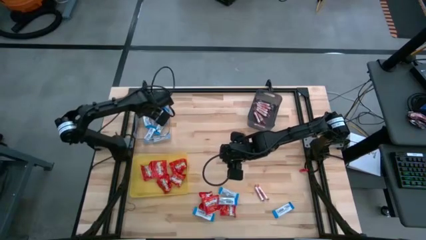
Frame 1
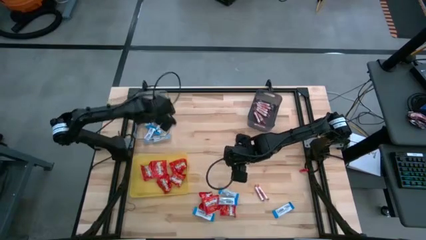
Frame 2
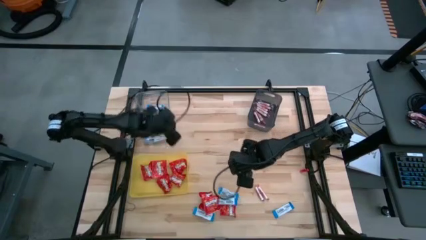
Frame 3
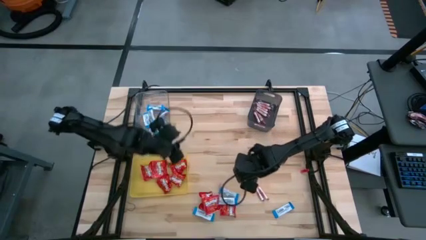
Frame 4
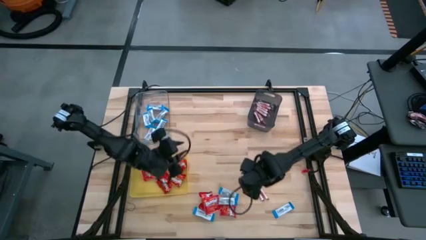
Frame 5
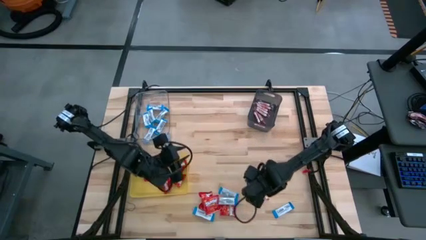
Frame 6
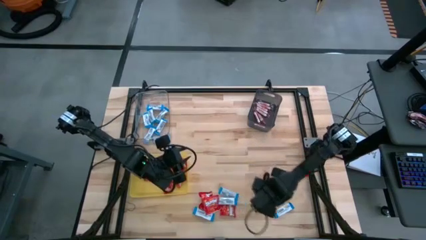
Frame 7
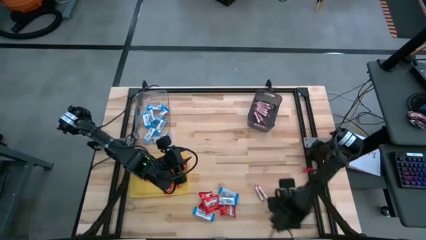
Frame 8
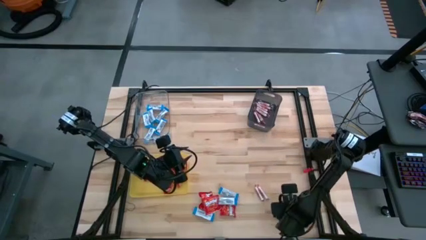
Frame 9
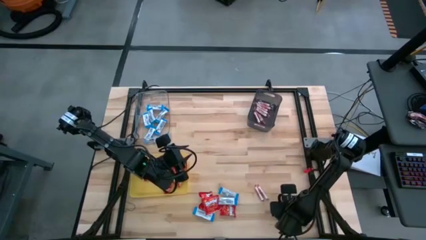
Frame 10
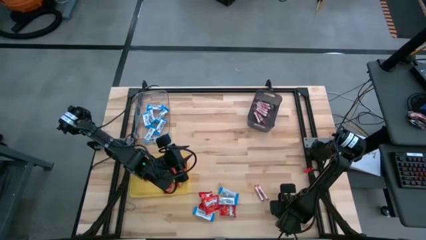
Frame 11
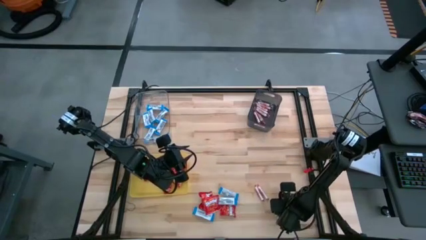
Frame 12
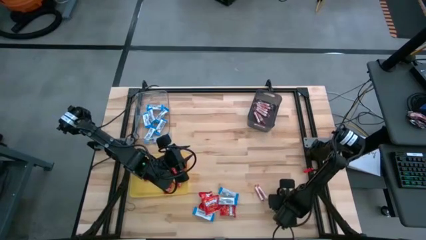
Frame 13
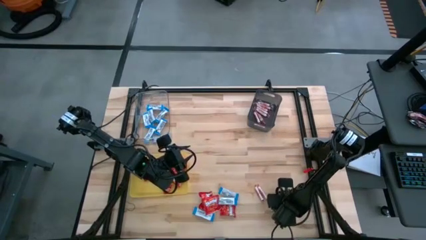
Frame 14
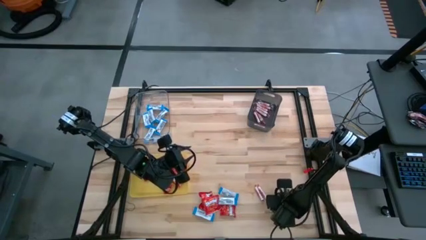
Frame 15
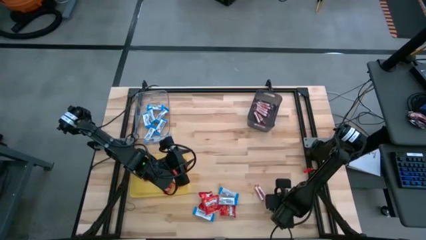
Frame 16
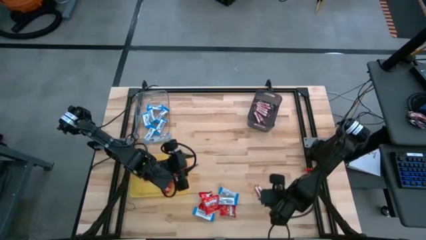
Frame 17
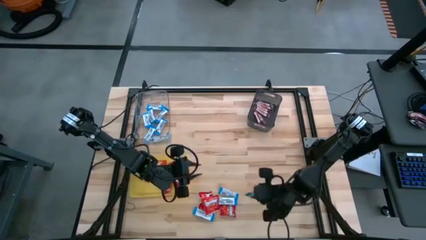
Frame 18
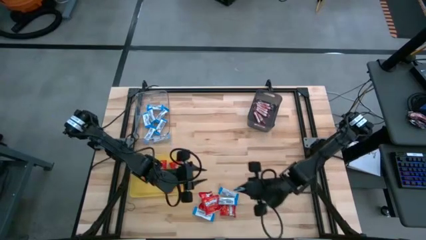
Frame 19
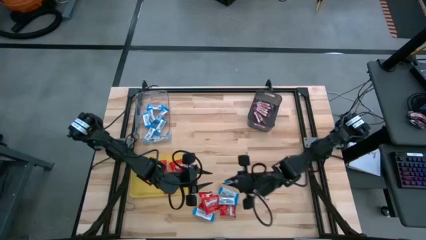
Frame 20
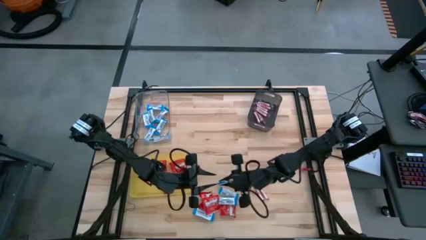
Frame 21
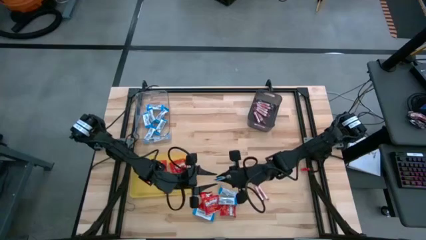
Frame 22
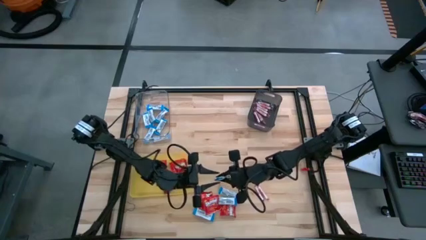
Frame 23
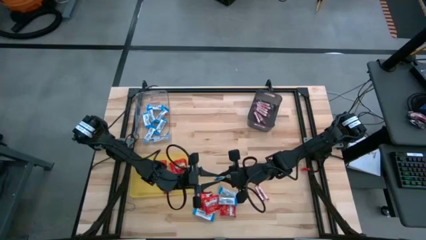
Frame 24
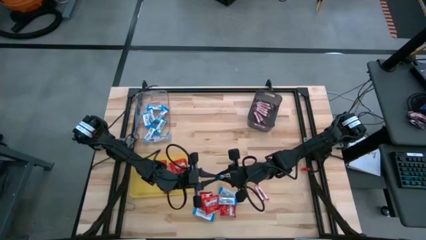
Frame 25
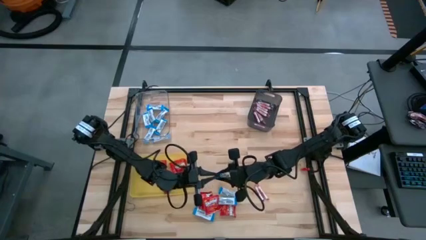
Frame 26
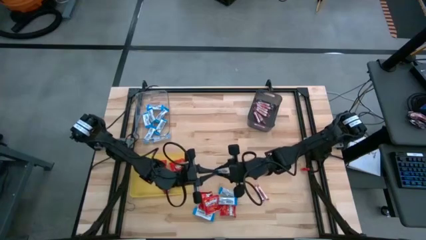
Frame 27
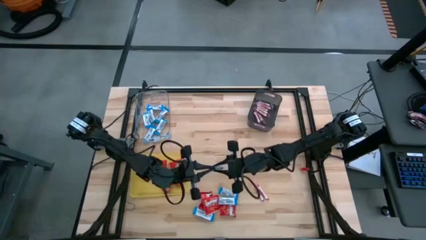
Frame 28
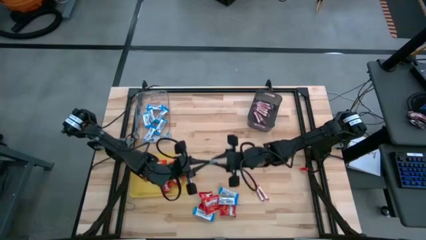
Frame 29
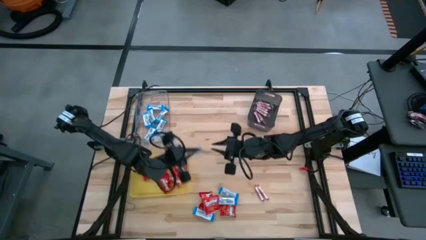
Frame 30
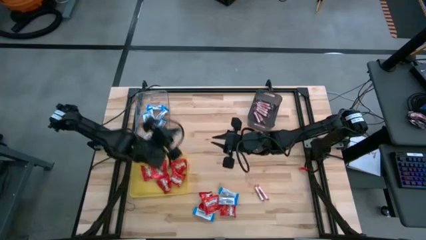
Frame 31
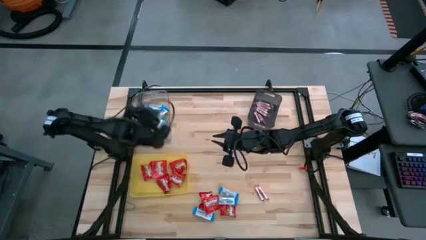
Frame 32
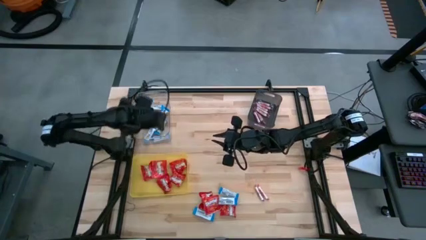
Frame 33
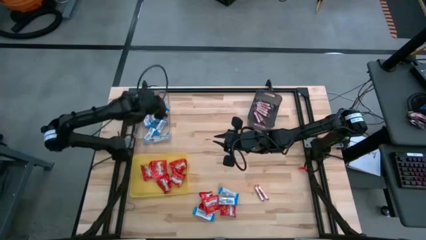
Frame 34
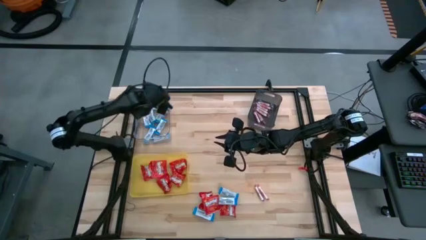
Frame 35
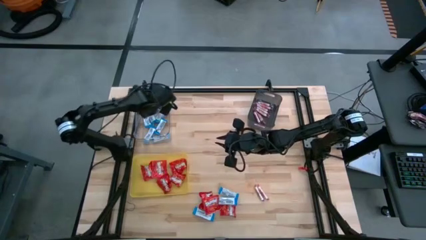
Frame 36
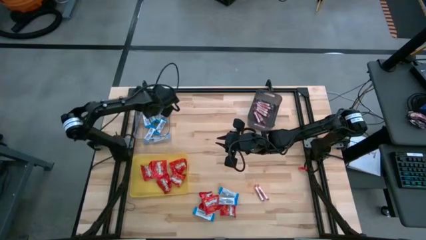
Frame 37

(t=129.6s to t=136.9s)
Task: Sort candy
Put the blue chocolate into the transparent bin

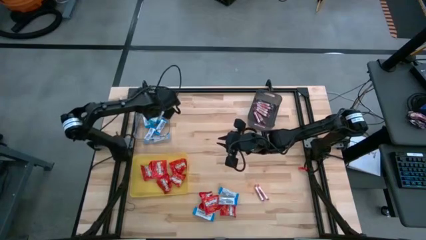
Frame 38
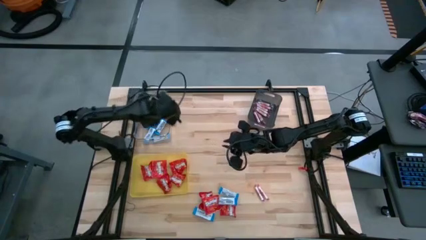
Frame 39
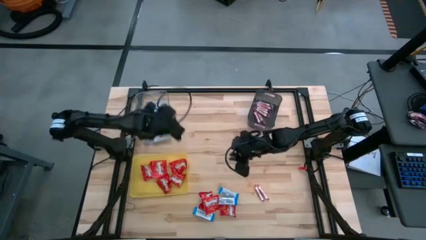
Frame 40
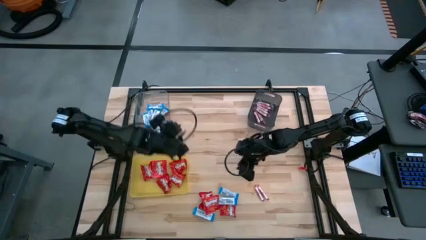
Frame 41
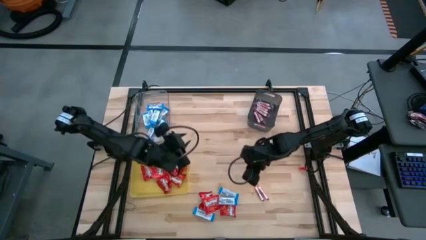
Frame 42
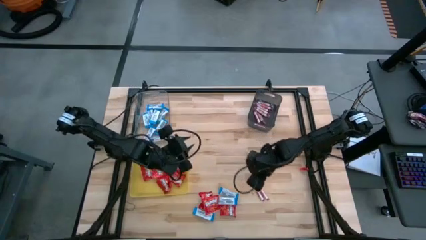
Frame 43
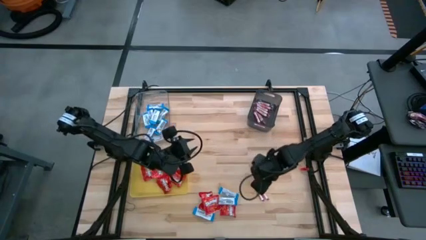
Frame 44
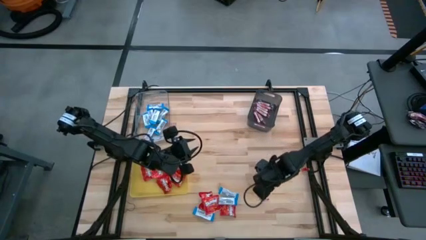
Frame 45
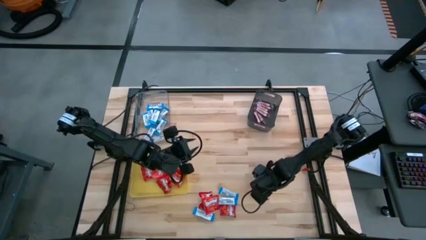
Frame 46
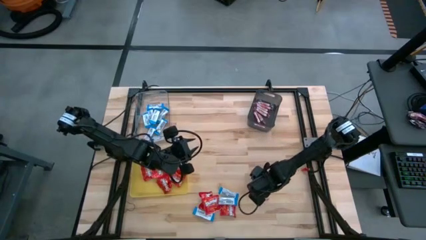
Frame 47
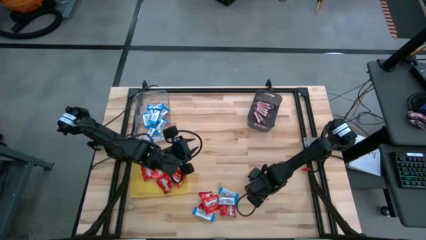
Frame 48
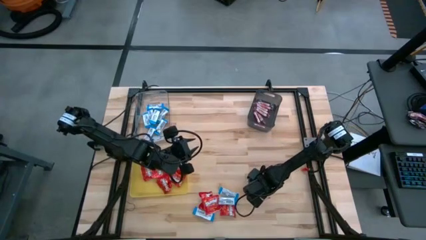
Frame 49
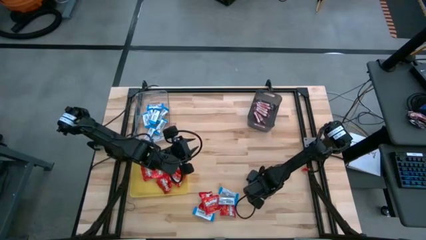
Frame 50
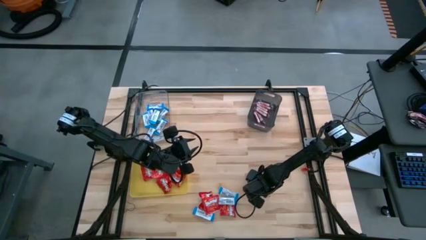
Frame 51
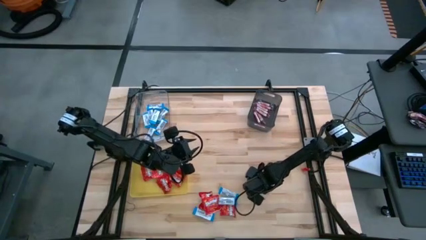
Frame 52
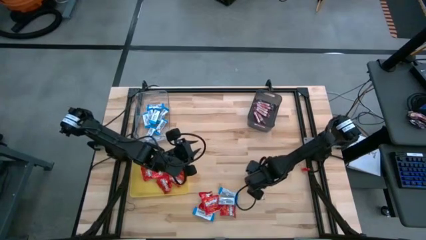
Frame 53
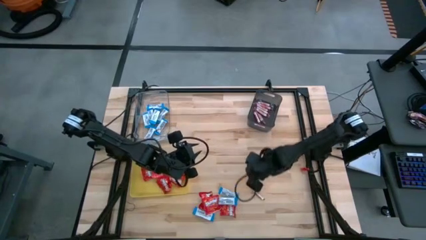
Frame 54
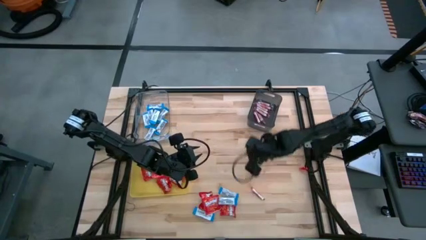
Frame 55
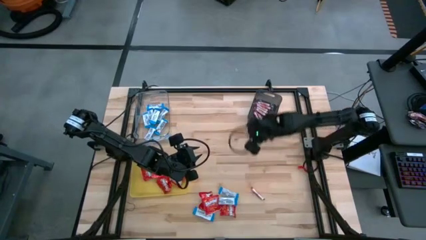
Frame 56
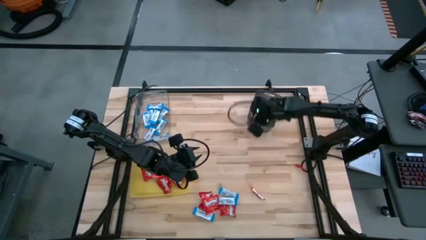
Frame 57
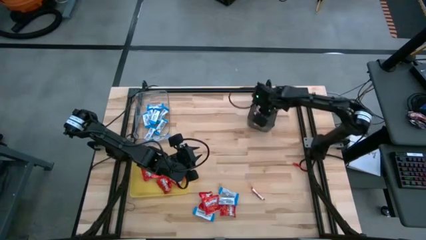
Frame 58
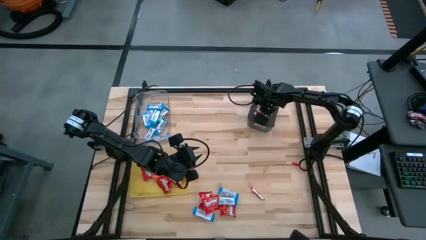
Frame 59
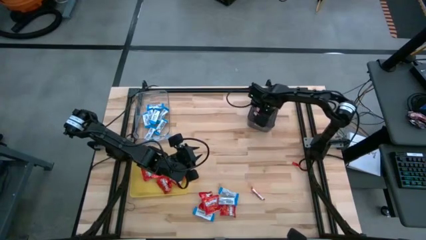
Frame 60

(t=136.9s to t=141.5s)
Put the white candy into the black bin

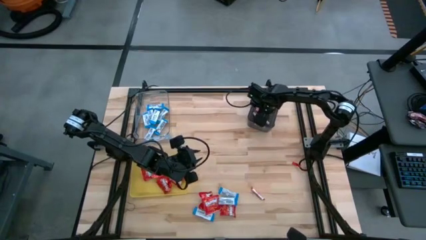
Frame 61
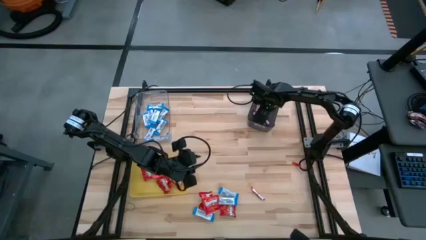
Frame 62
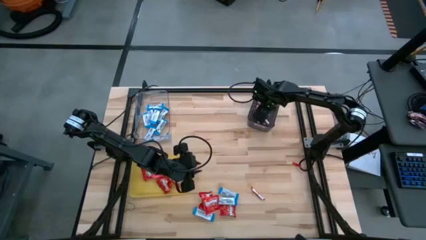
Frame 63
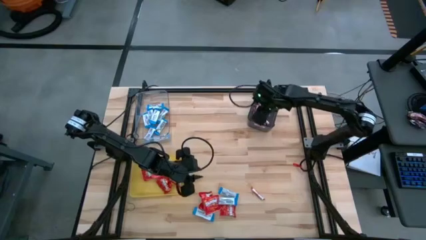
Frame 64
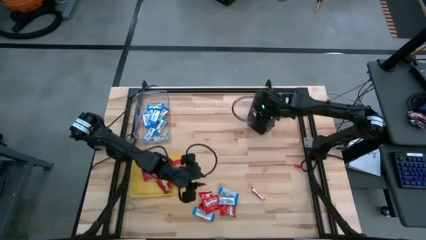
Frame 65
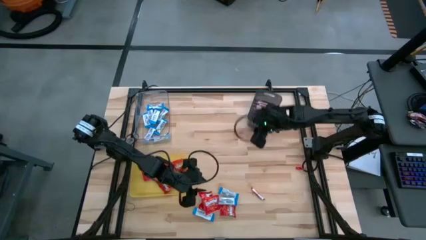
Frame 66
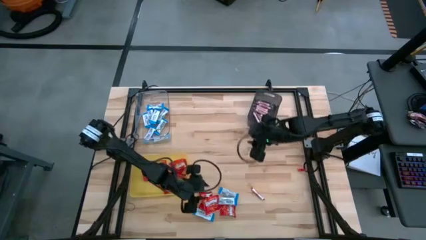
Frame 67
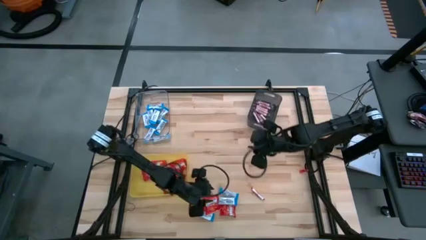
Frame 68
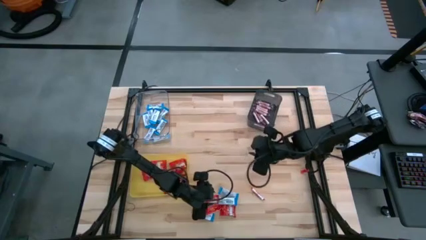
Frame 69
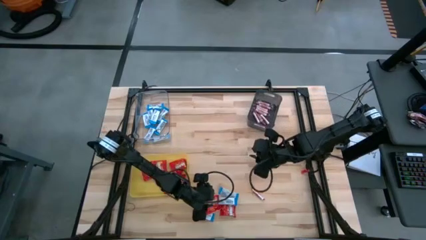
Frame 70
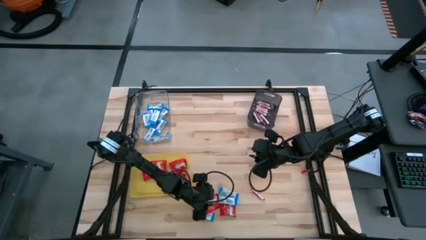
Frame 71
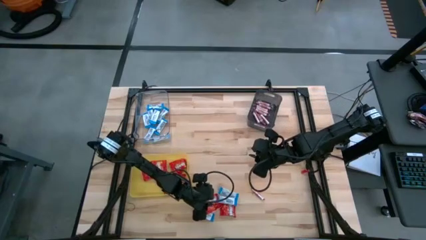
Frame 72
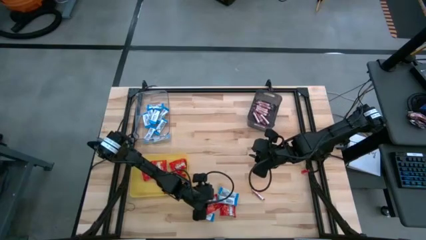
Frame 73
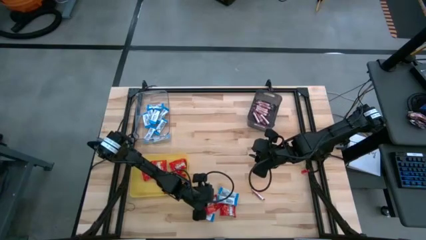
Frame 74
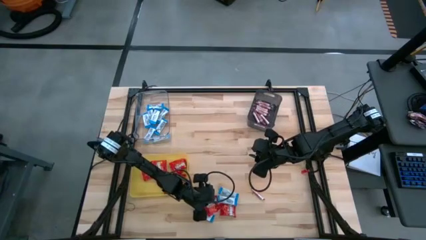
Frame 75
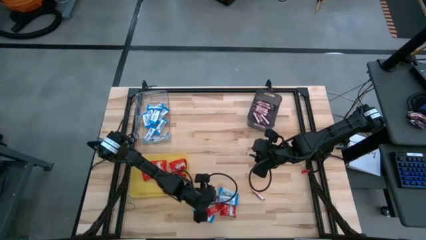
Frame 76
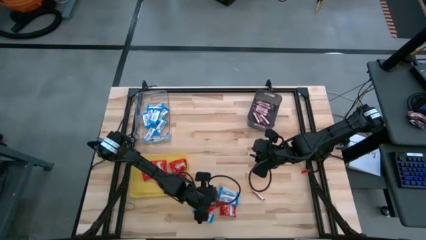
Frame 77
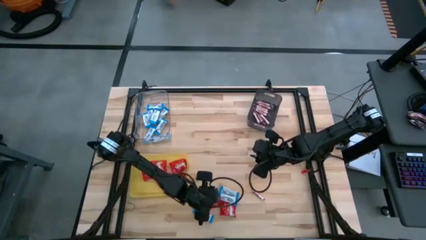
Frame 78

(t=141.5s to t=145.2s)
Put the red chocolate into the yellow bin

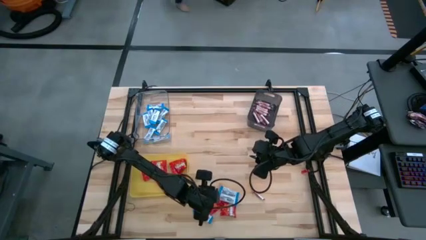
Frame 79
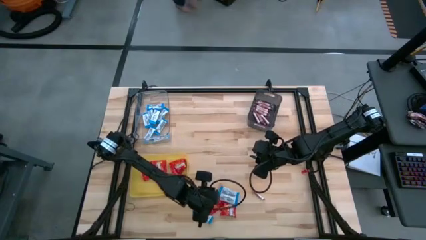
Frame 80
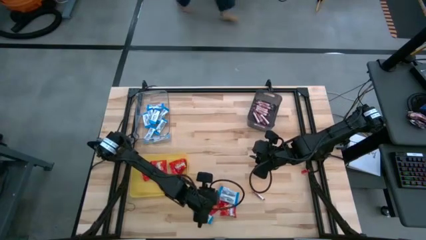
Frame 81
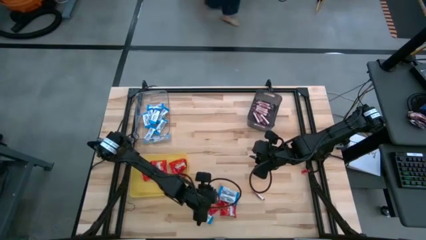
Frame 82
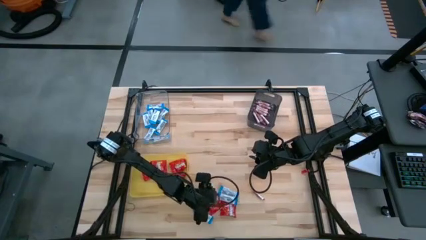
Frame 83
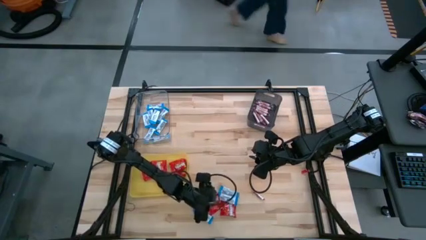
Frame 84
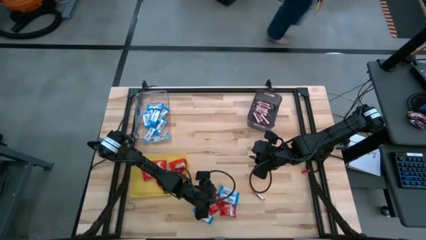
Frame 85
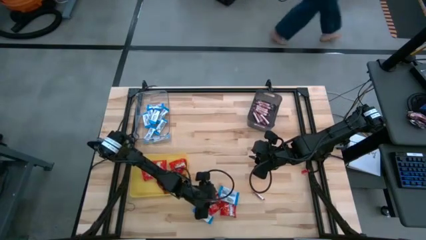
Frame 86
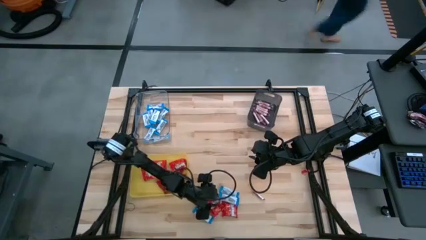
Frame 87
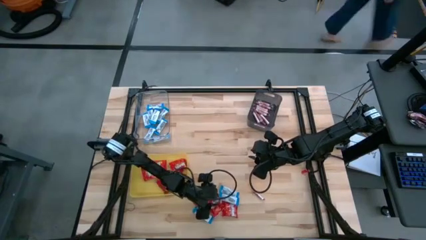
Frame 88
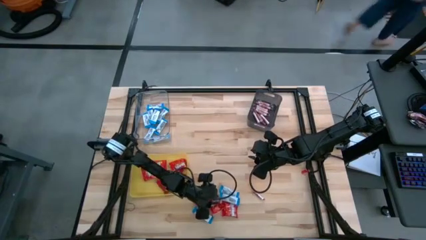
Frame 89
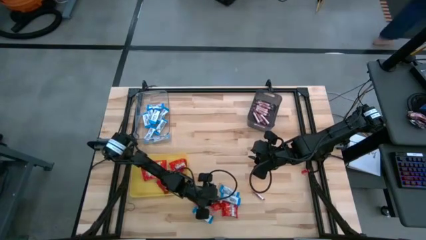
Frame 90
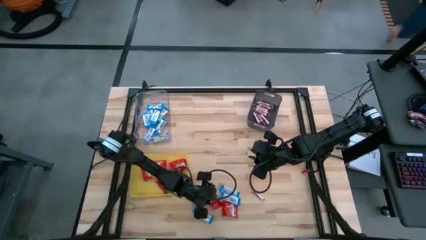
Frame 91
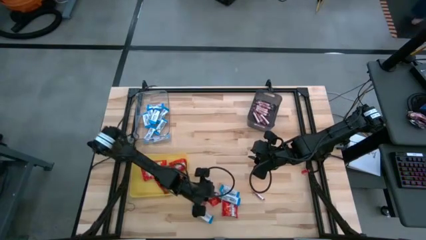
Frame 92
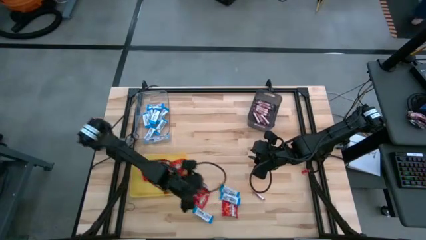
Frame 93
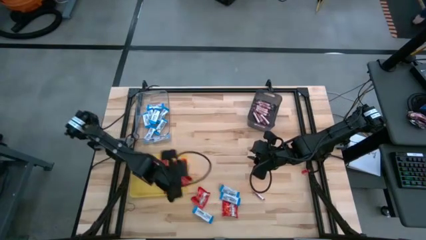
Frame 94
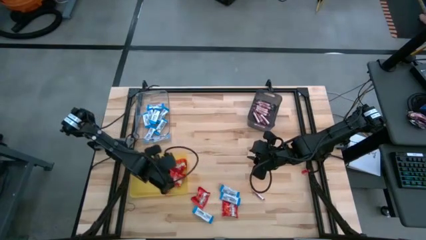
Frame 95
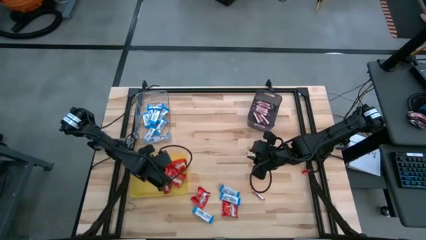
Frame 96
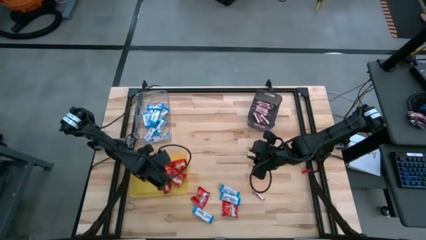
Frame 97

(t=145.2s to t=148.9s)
Put the red chocolate into the yellow bin
